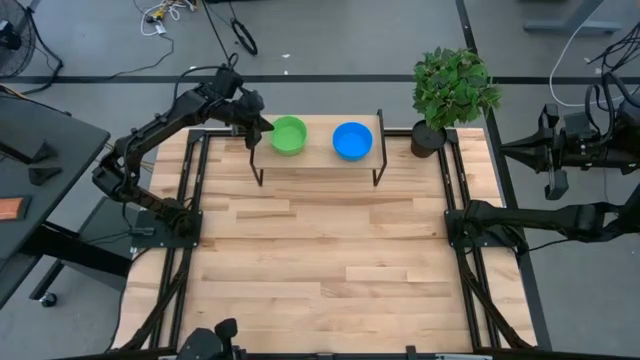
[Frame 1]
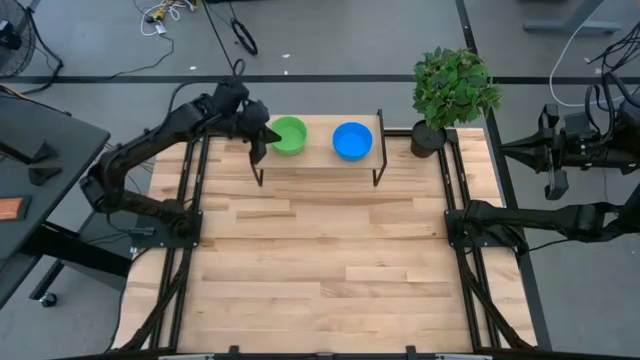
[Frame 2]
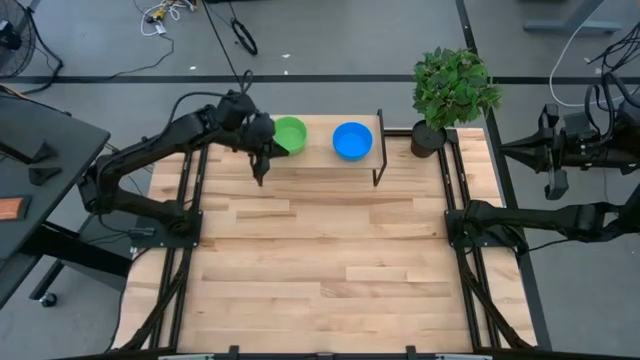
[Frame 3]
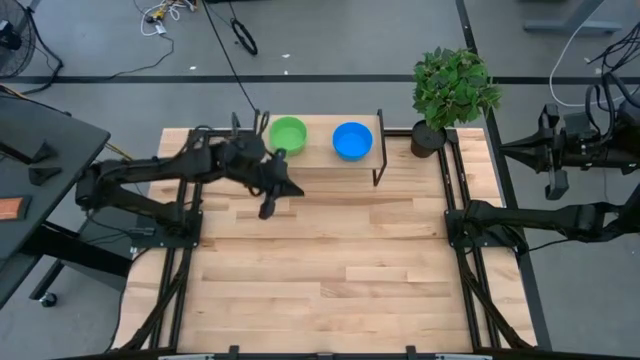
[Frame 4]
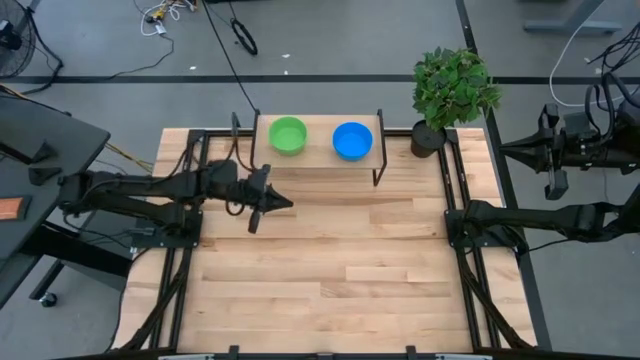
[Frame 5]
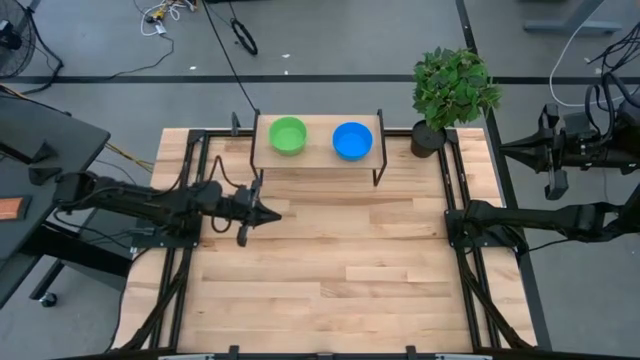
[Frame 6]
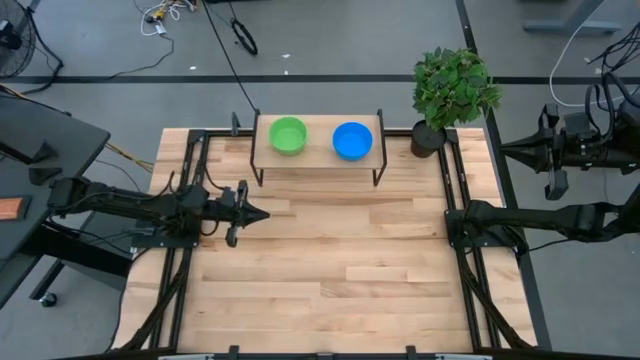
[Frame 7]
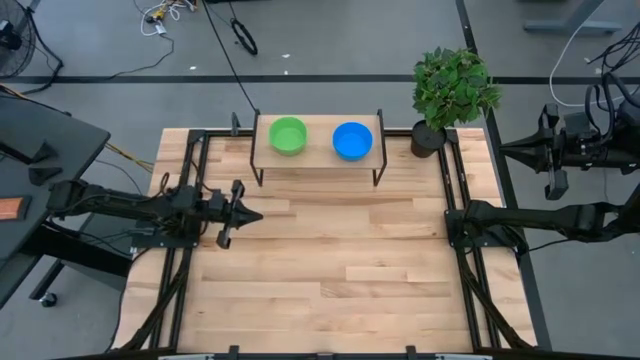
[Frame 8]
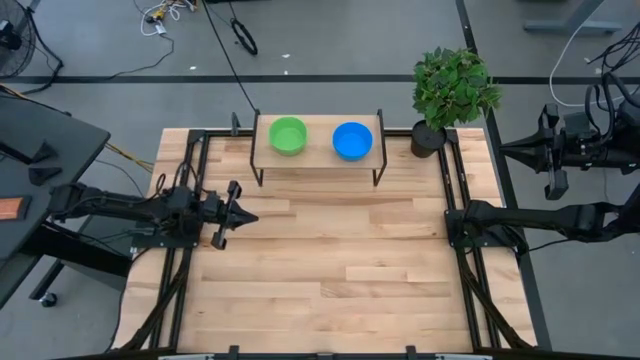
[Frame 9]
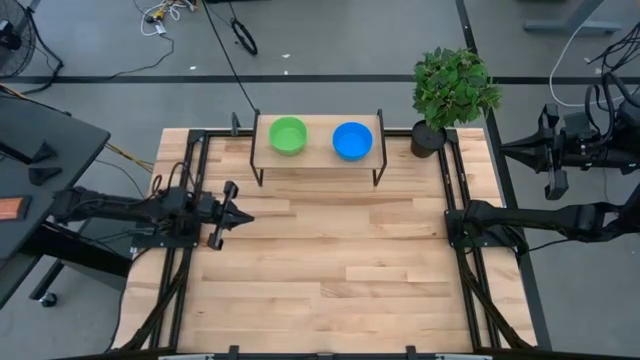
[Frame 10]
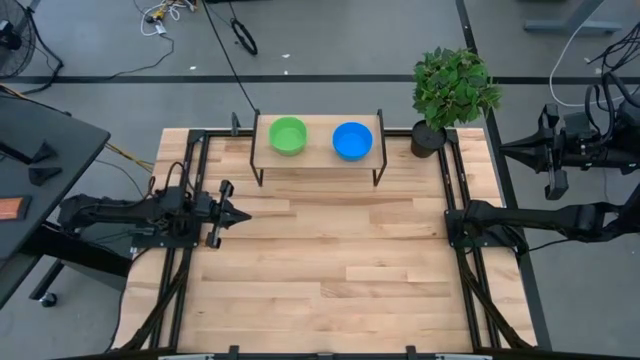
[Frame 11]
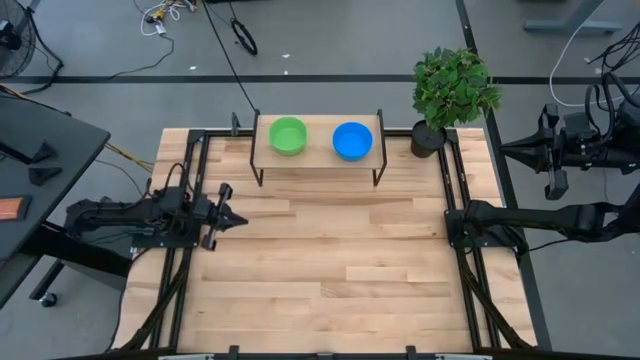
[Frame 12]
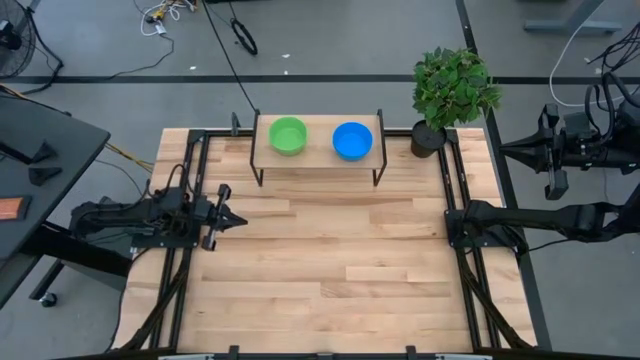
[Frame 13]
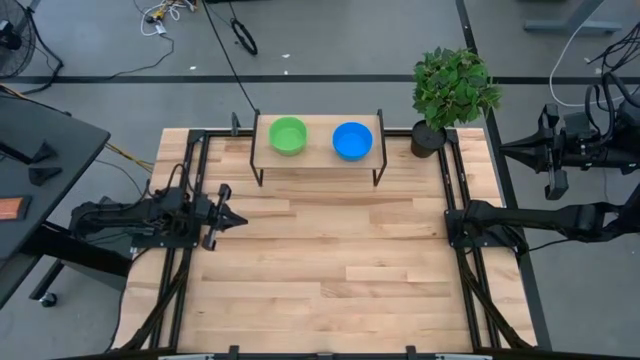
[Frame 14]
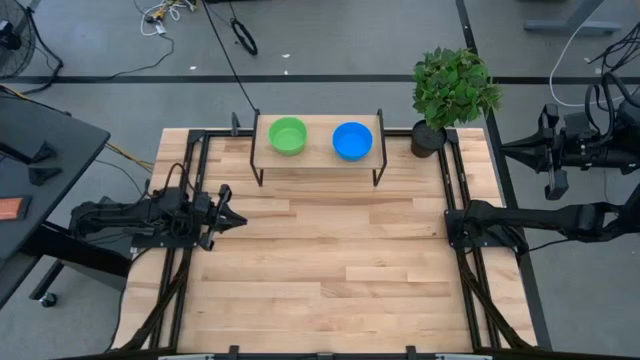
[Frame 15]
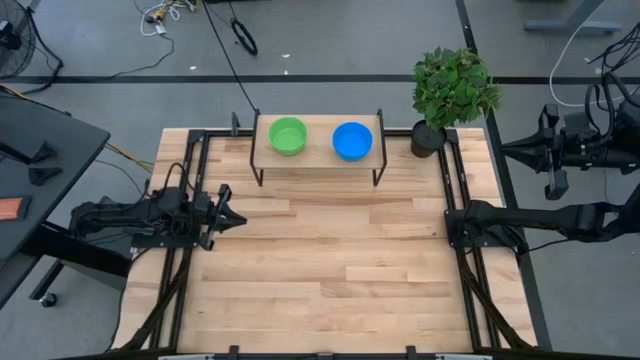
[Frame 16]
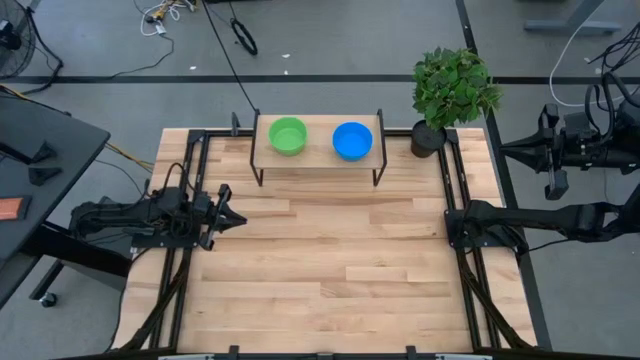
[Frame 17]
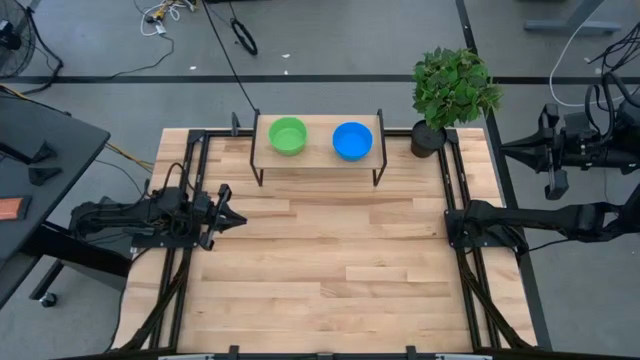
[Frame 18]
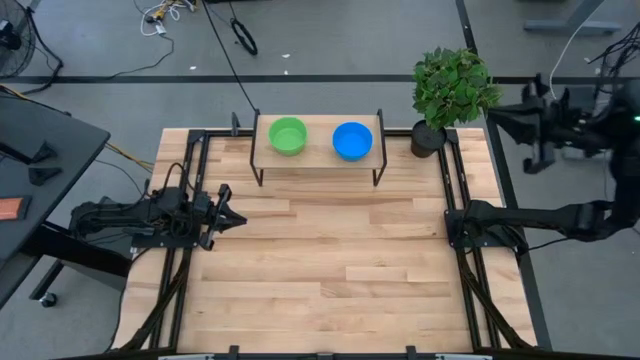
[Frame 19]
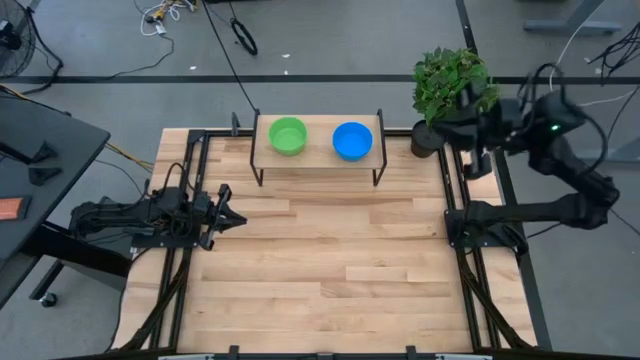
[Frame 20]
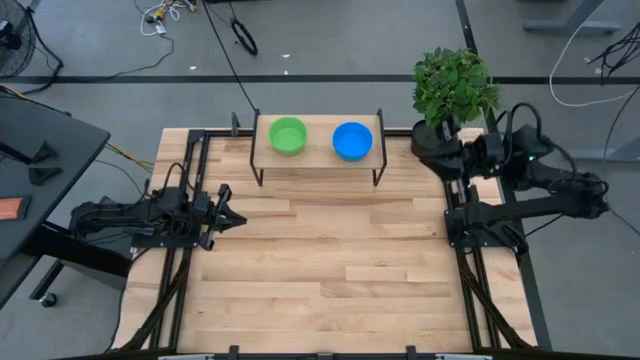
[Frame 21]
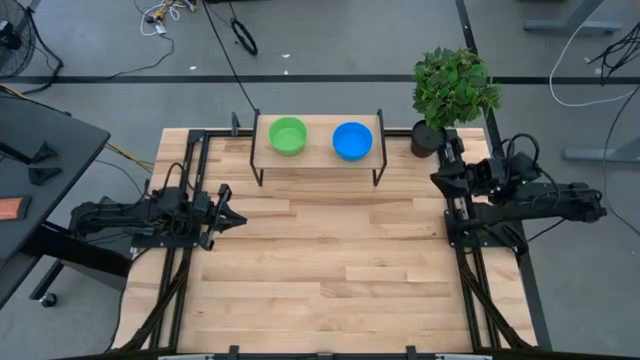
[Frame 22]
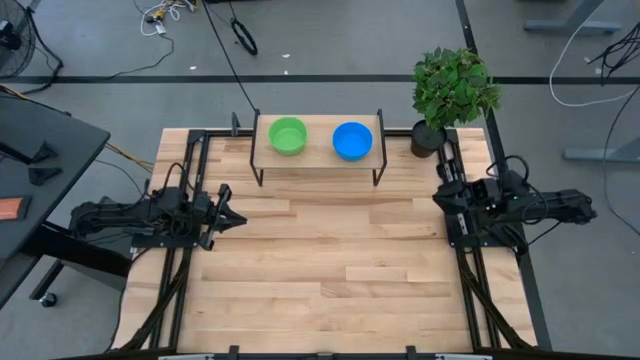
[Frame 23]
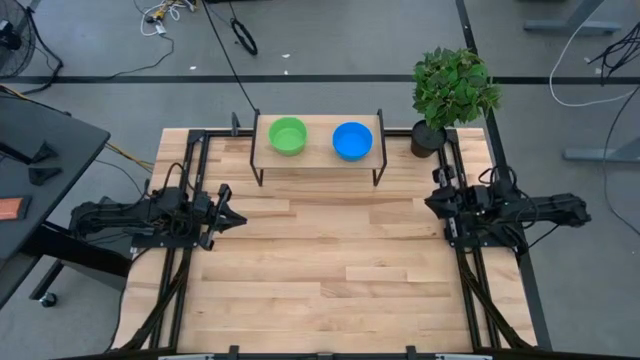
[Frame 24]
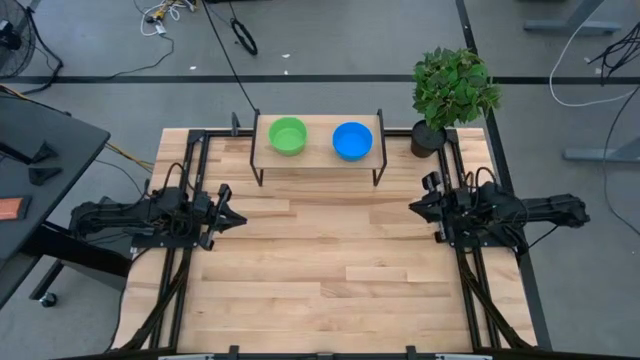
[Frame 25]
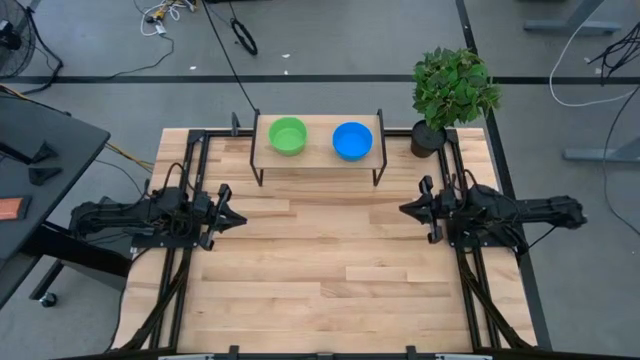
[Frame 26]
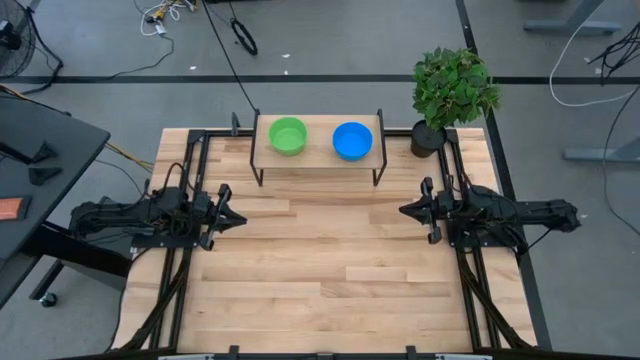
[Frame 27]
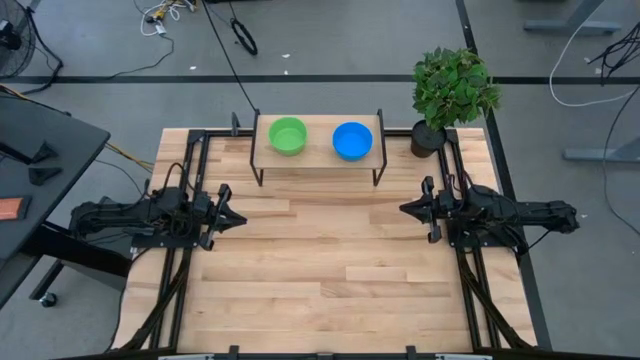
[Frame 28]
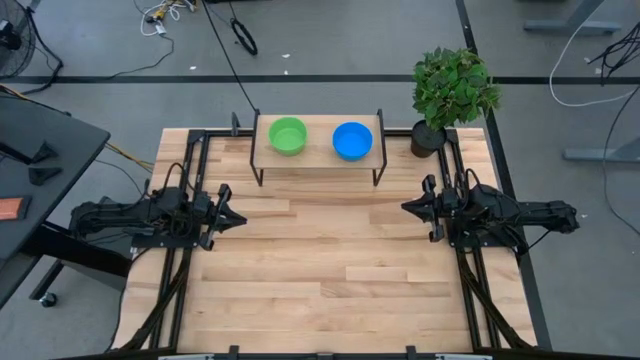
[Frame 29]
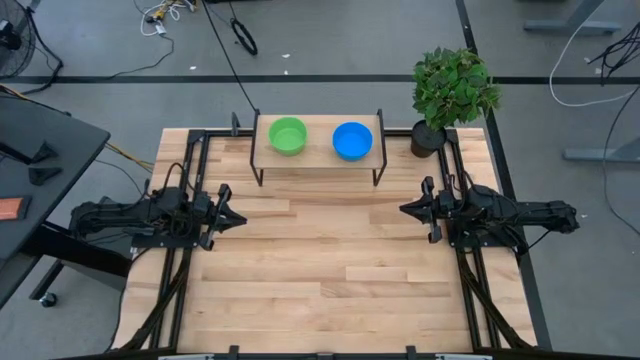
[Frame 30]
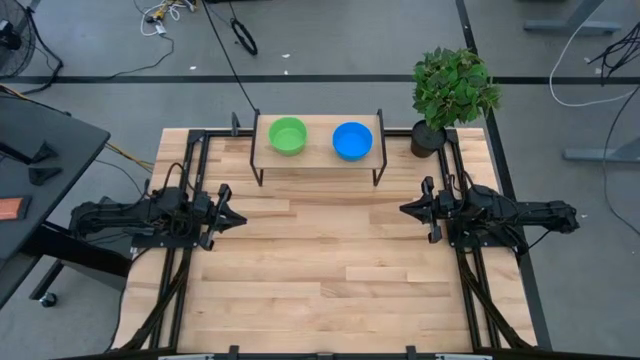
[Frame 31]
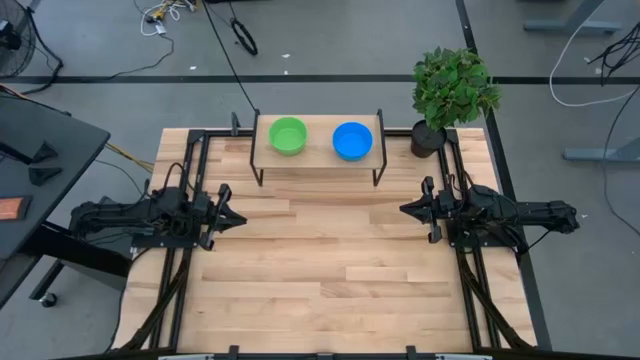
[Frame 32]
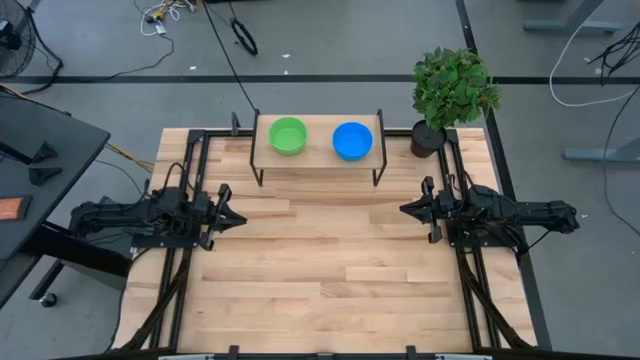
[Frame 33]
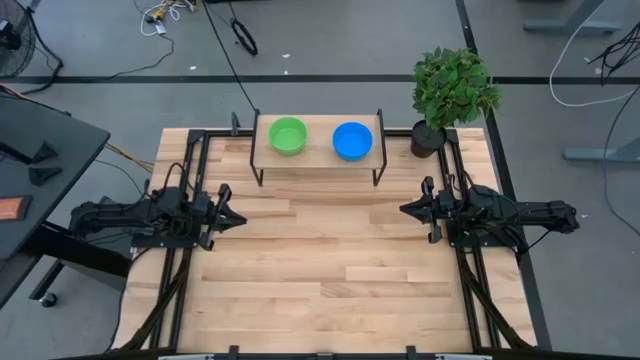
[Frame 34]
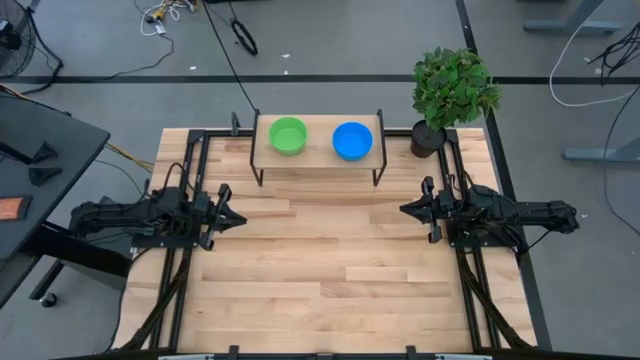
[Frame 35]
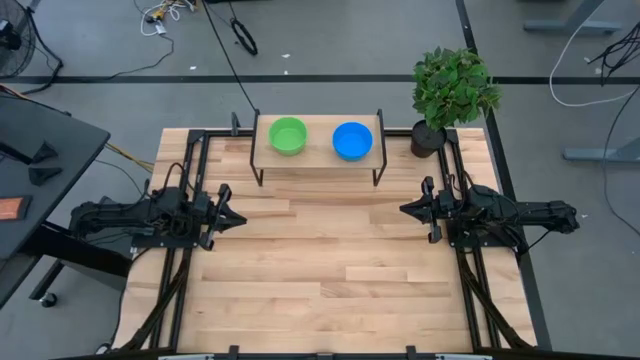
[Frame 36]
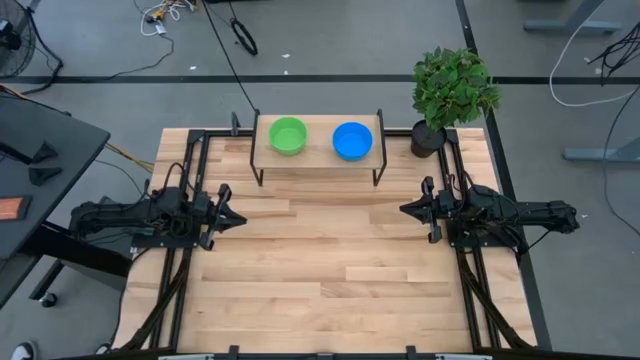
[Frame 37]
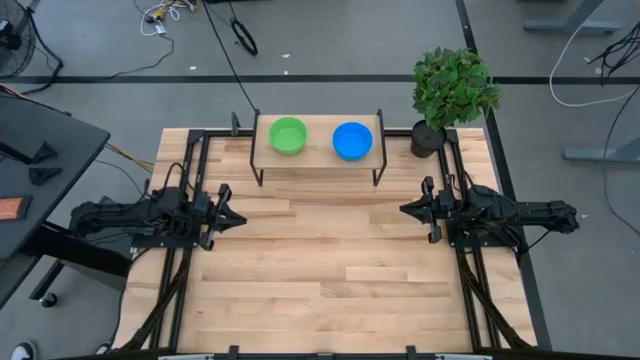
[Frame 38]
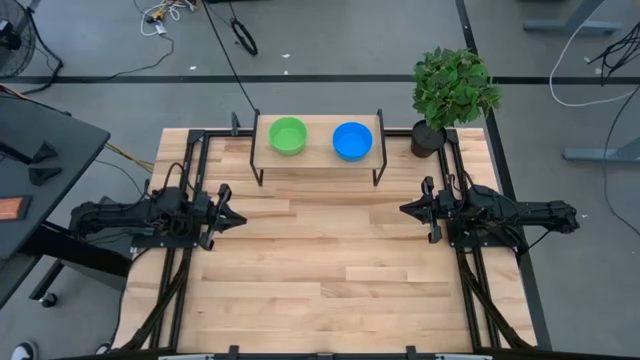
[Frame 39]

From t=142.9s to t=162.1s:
Task: Pick & Place Mini bowls
Return to Home Position

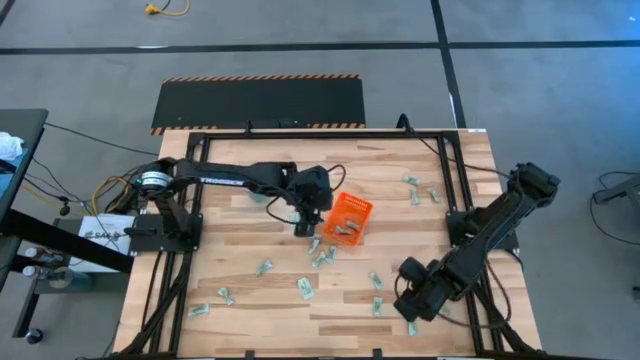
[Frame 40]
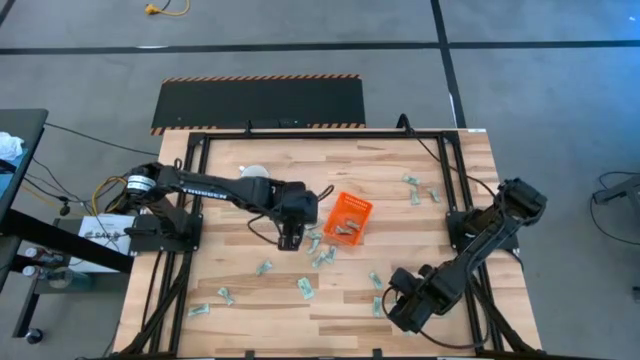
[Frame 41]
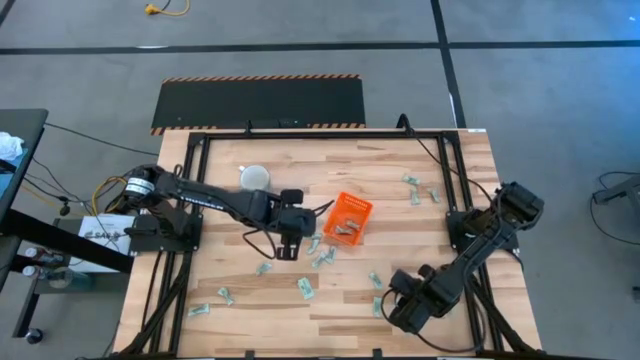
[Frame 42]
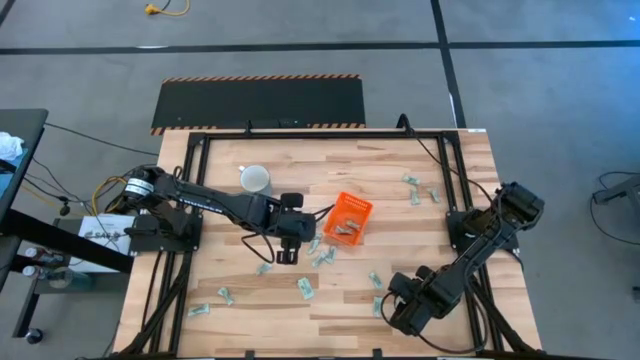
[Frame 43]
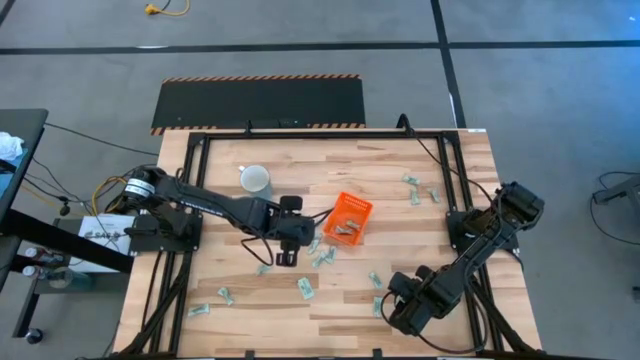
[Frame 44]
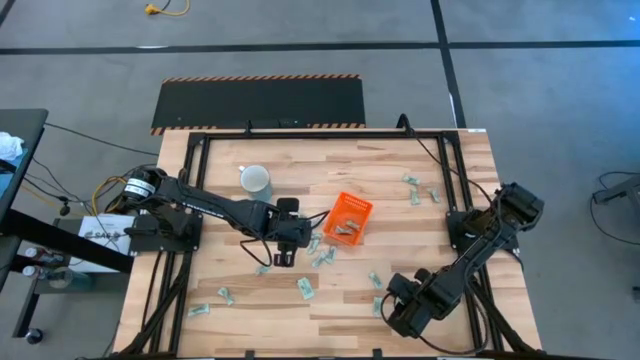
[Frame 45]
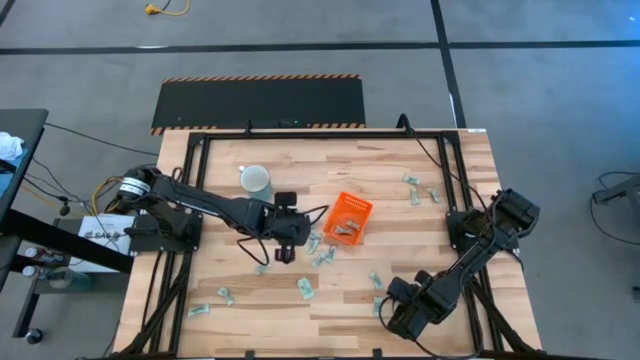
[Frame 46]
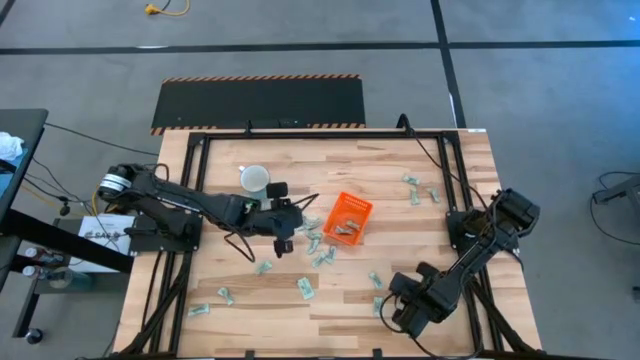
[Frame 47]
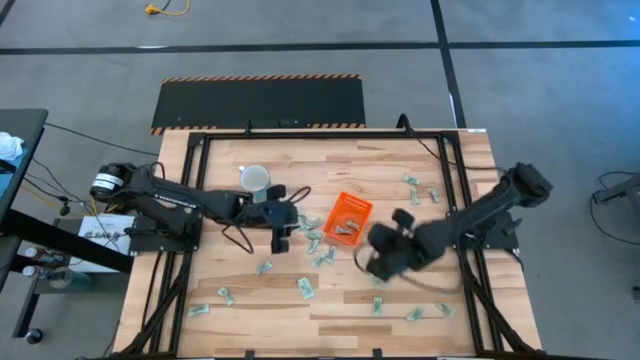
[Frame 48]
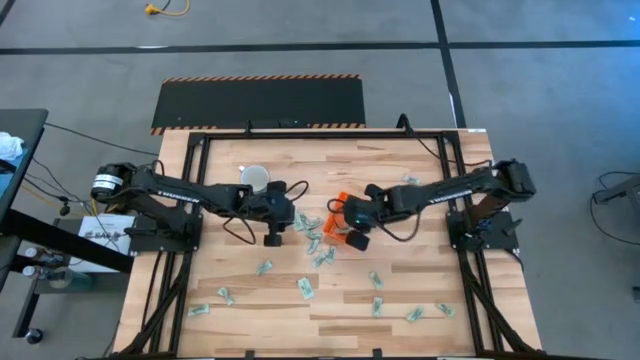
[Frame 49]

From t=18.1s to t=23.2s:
Task: Pick and place Stevia / Truvia into bins
Put the stevia packet into the basket
